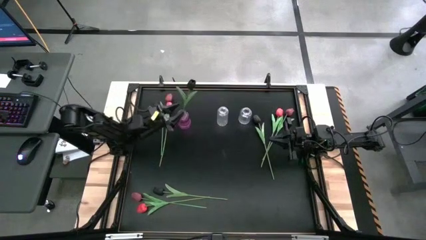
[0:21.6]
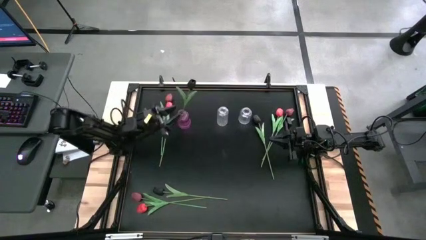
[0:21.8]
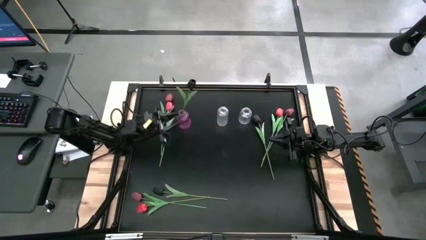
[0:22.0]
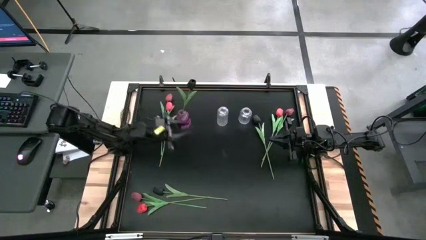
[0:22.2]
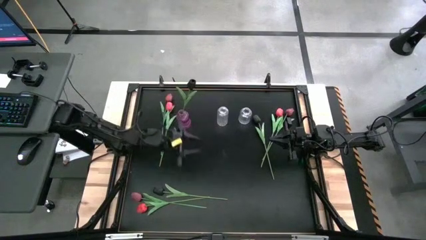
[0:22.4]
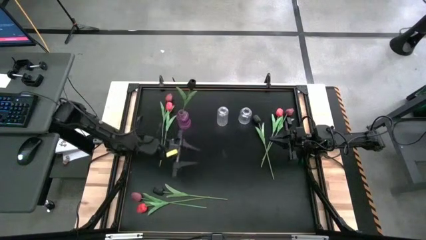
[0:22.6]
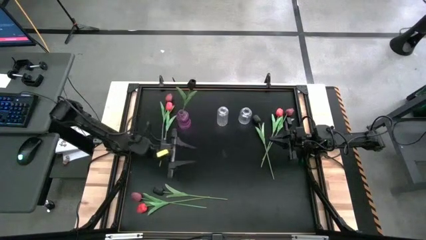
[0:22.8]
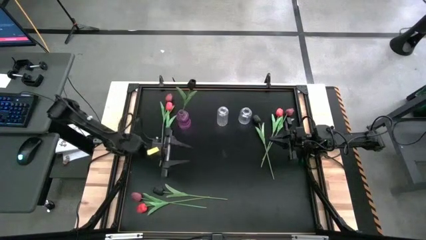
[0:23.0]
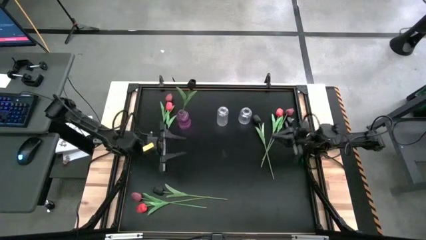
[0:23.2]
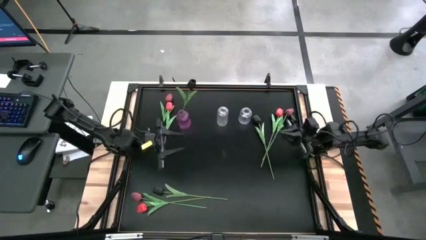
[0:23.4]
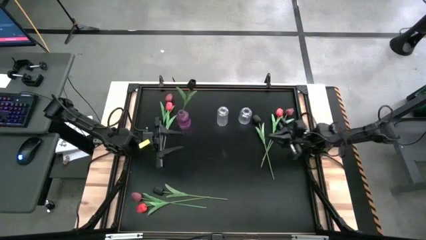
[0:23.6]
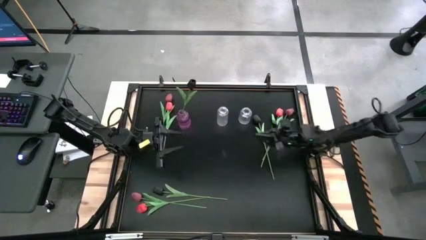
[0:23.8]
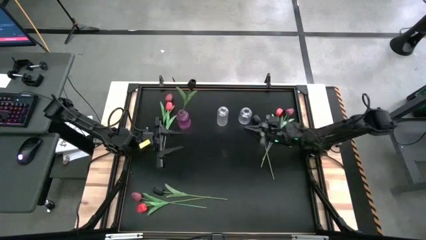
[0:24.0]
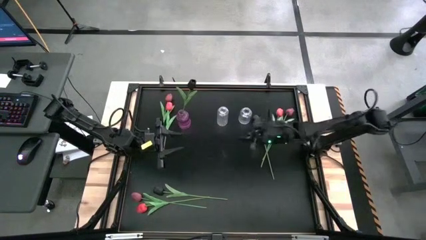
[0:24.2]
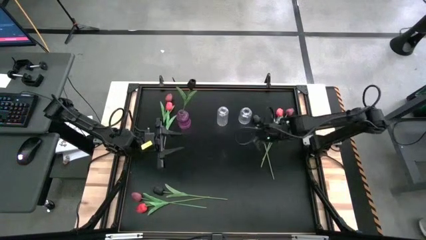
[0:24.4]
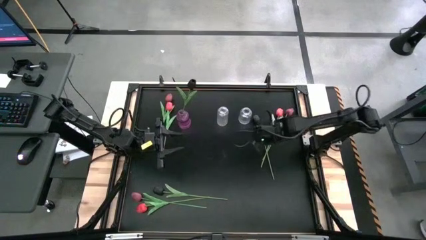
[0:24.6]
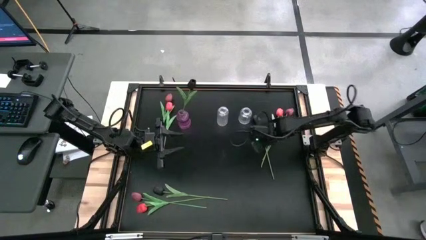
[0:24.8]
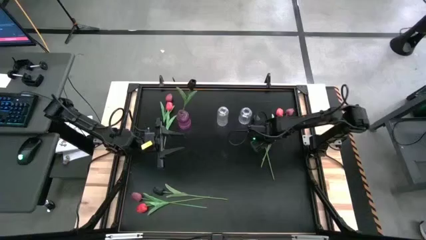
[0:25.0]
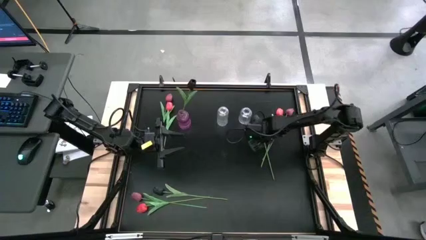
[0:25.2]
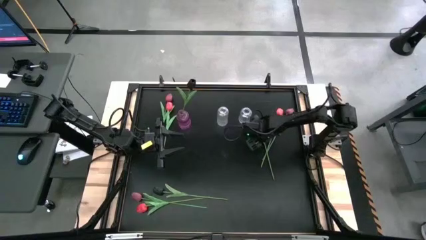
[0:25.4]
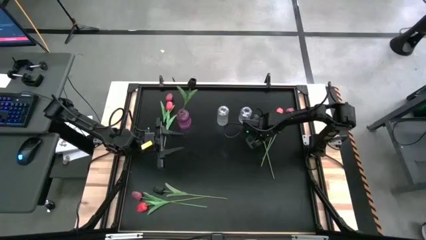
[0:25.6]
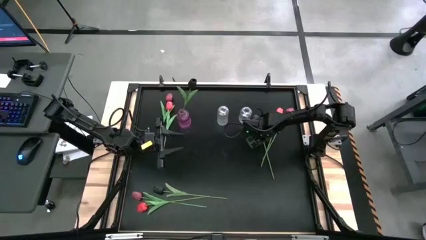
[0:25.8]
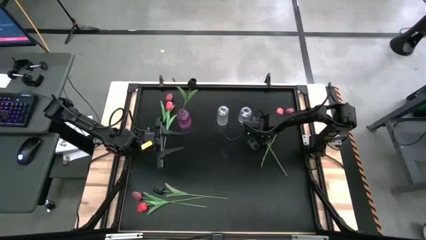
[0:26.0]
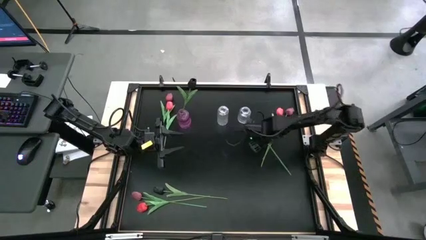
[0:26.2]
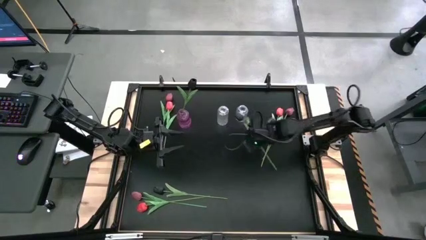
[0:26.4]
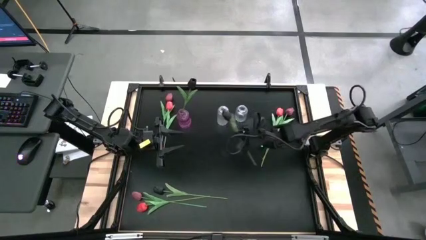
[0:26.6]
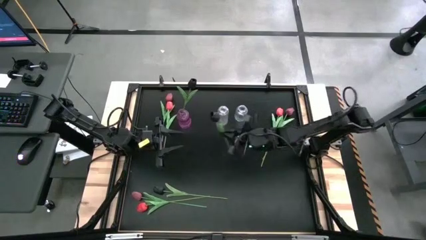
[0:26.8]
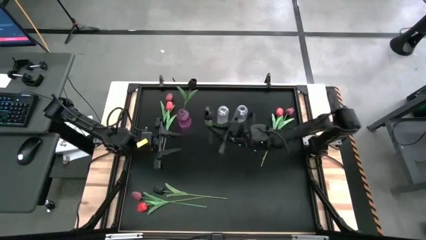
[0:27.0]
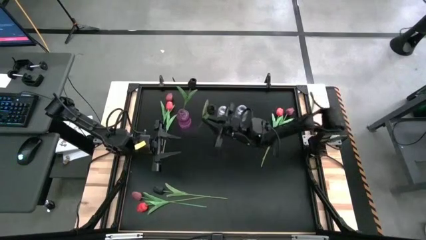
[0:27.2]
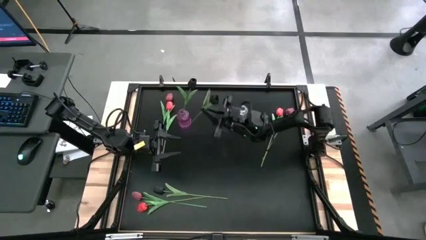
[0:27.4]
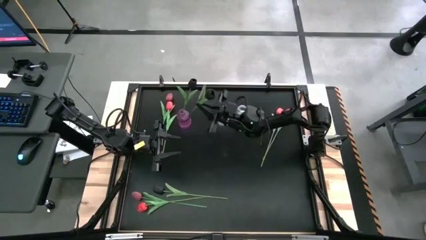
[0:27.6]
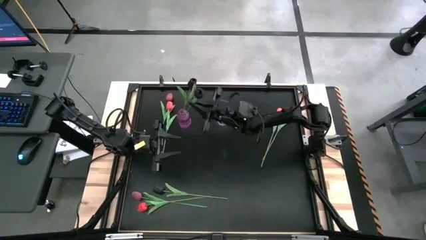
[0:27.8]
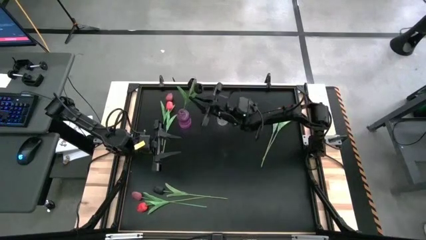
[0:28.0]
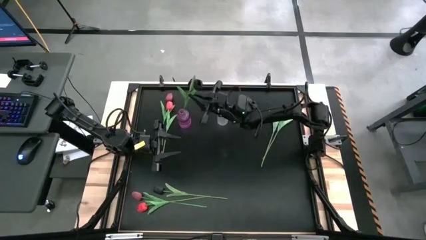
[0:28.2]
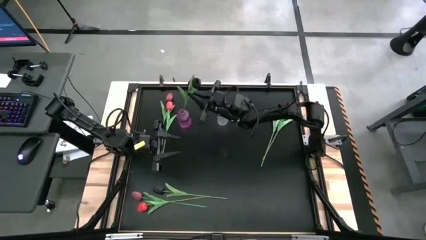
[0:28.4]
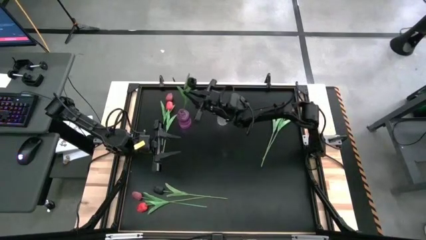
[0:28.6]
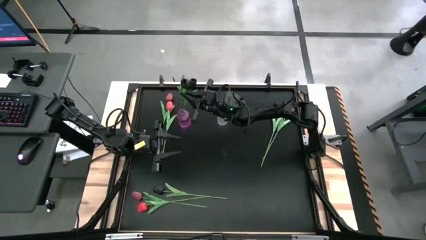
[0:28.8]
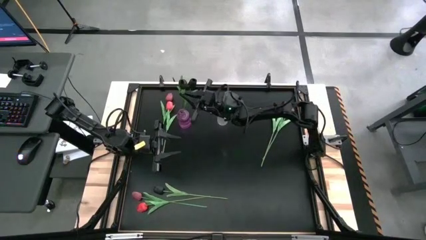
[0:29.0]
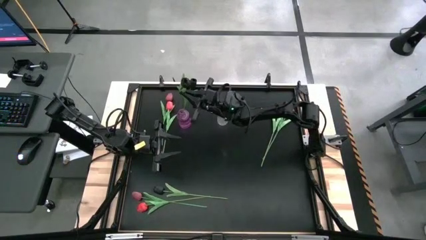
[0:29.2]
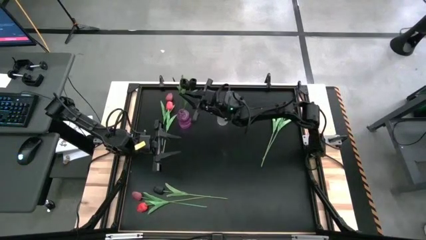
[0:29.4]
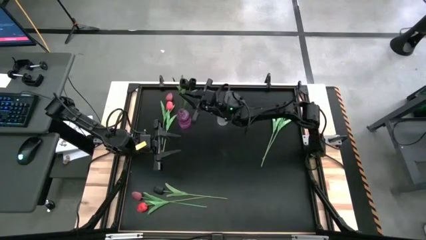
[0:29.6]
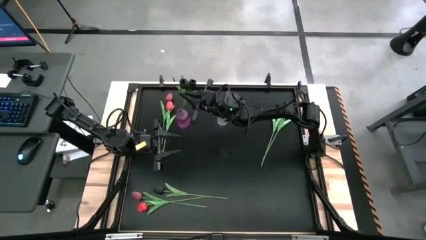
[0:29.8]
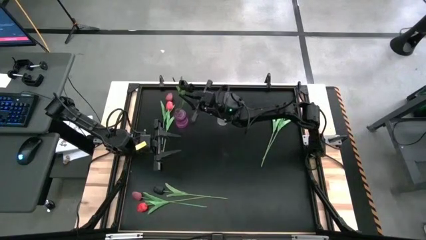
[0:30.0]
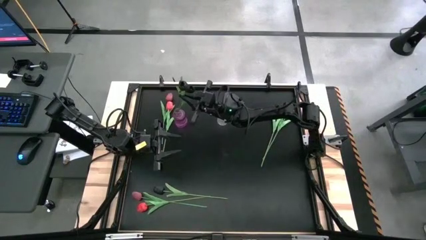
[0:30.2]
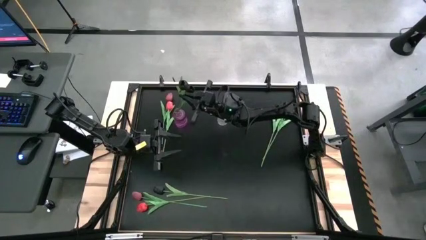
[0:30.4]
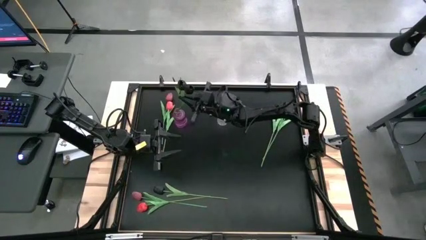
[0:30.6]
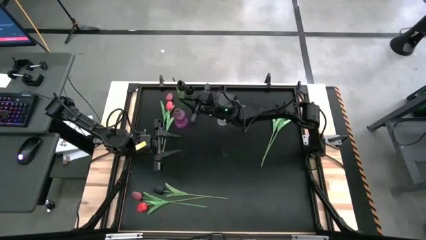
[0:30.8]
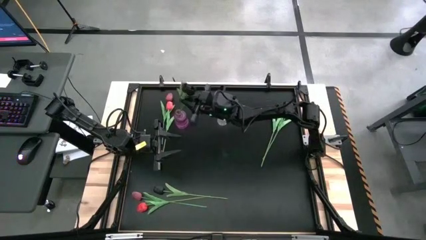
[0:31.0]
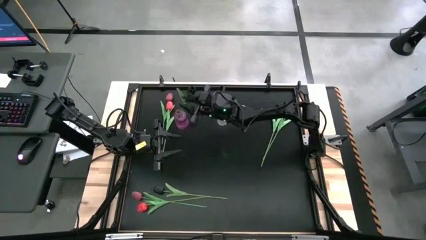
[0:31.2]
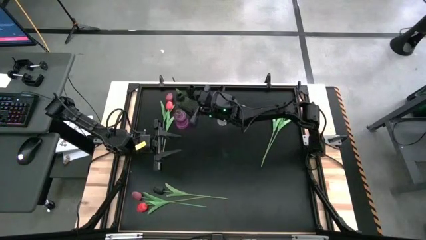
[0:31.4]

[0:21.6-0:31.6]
Task: Sort flowers into vase by color
Put the top black flower into the transparent purple vase
